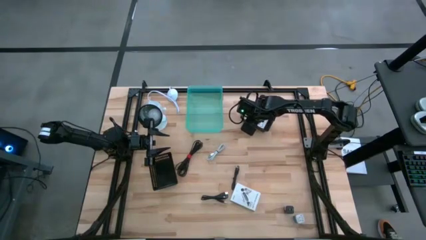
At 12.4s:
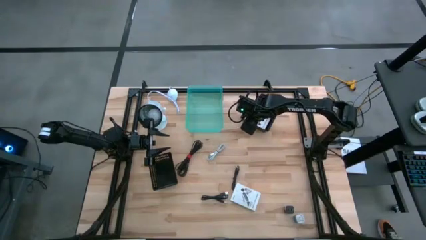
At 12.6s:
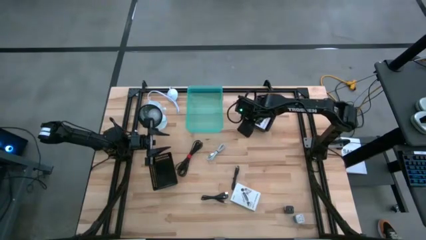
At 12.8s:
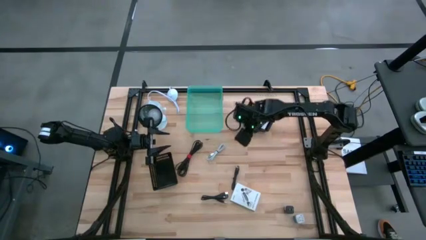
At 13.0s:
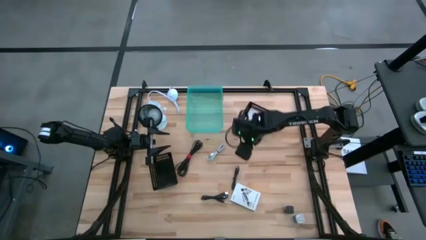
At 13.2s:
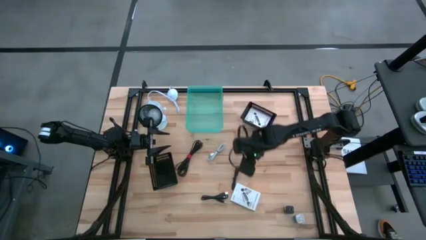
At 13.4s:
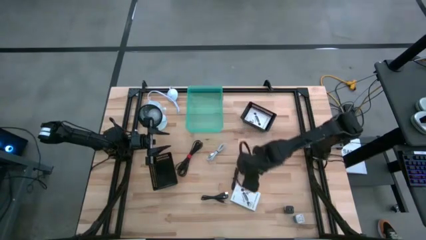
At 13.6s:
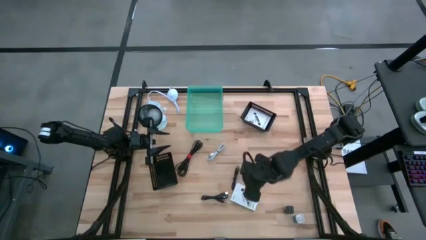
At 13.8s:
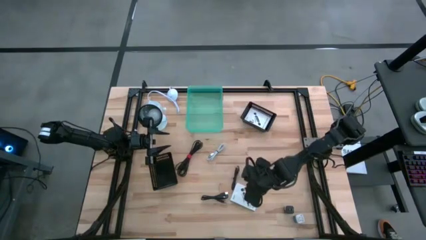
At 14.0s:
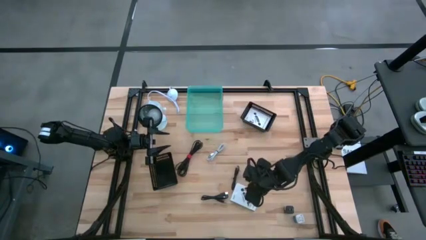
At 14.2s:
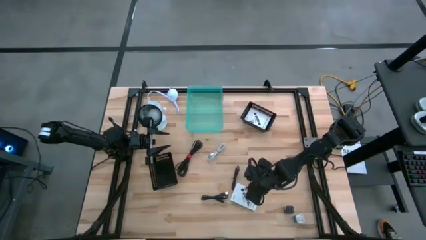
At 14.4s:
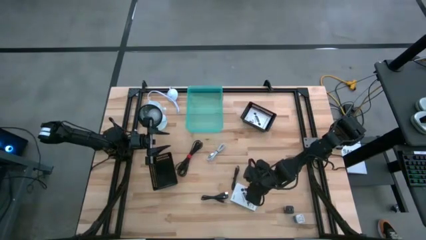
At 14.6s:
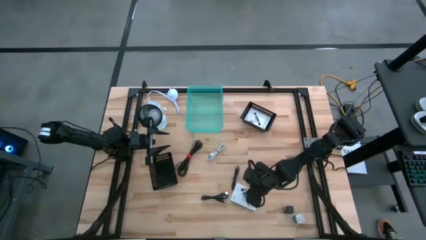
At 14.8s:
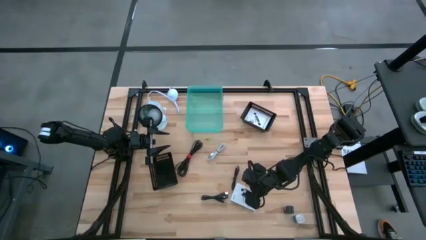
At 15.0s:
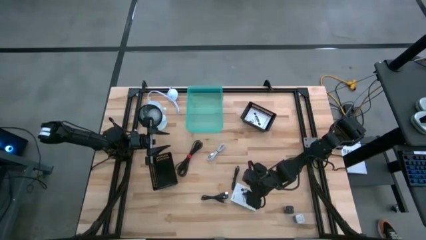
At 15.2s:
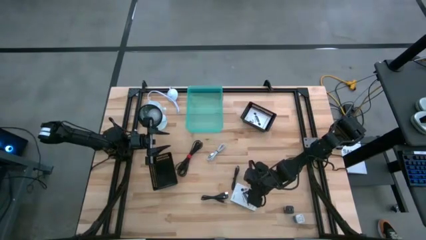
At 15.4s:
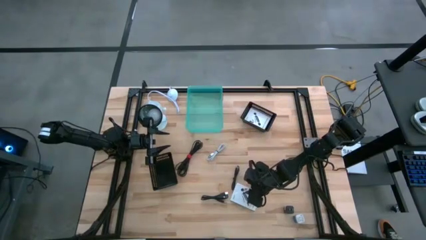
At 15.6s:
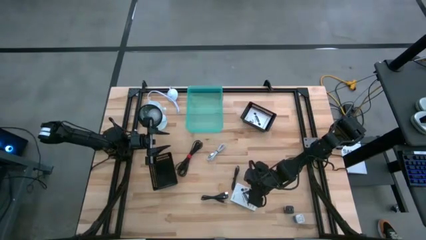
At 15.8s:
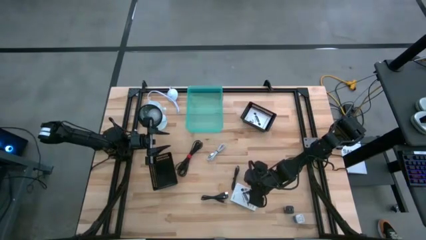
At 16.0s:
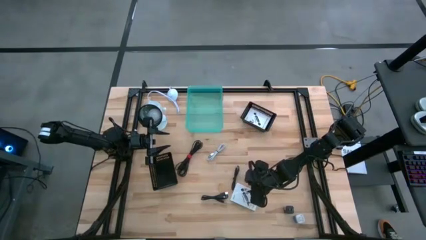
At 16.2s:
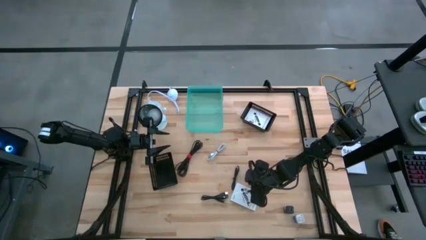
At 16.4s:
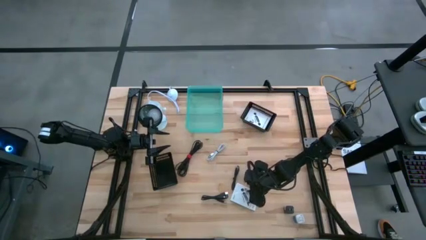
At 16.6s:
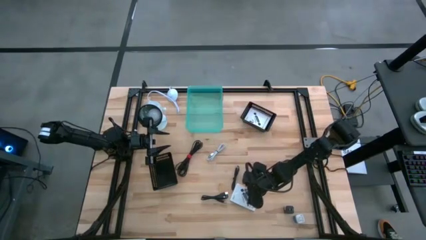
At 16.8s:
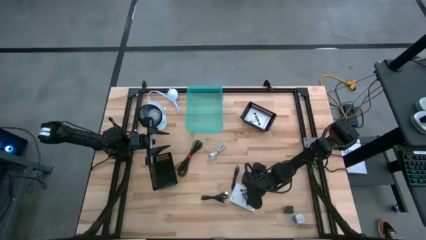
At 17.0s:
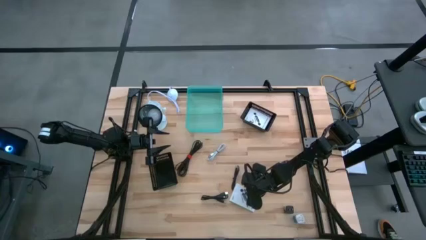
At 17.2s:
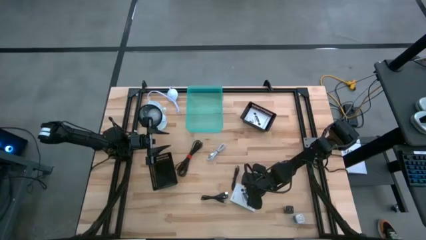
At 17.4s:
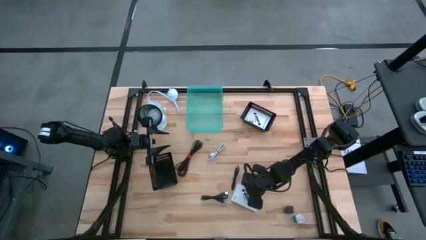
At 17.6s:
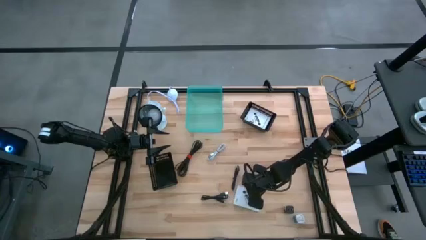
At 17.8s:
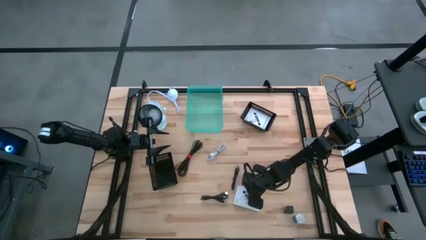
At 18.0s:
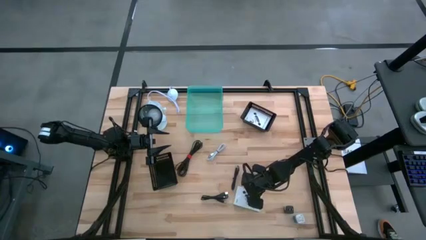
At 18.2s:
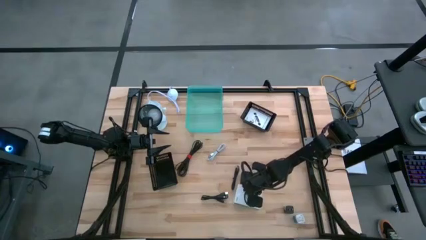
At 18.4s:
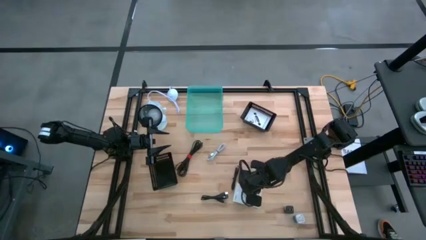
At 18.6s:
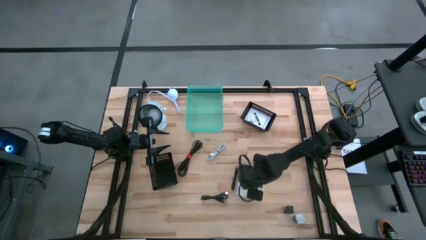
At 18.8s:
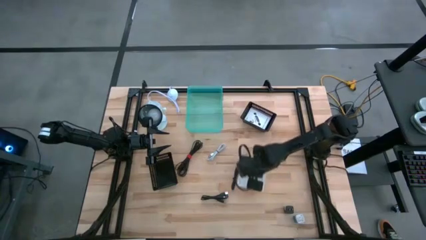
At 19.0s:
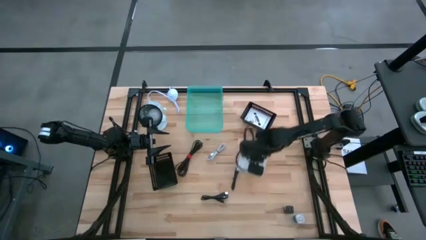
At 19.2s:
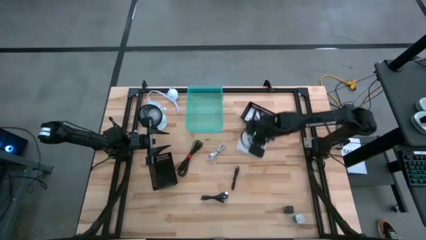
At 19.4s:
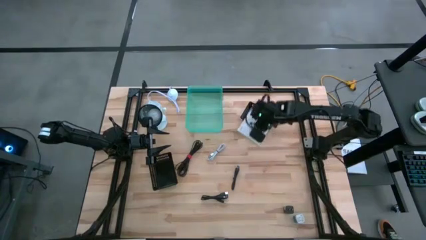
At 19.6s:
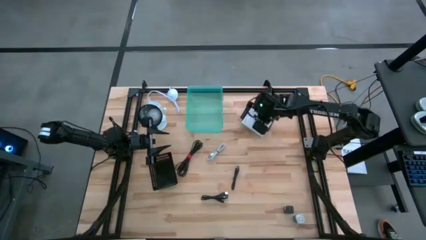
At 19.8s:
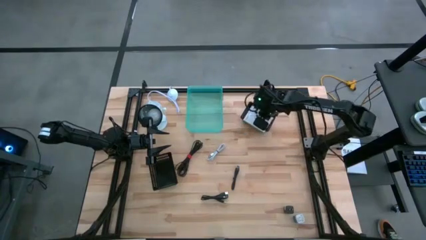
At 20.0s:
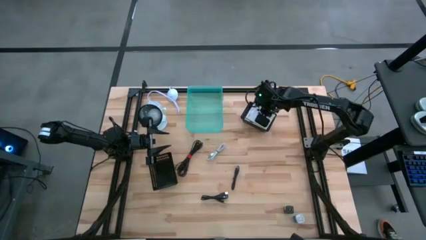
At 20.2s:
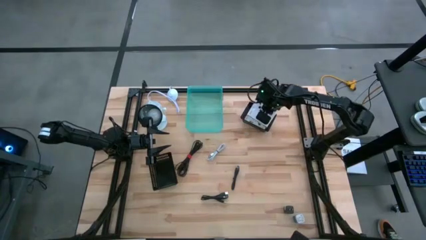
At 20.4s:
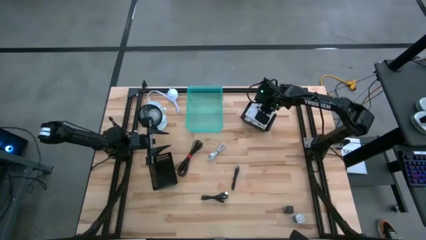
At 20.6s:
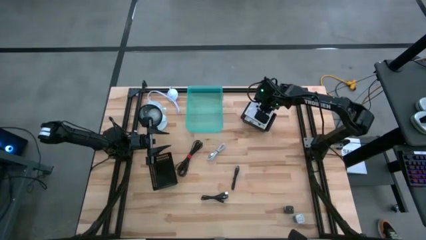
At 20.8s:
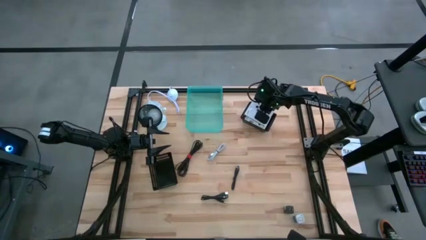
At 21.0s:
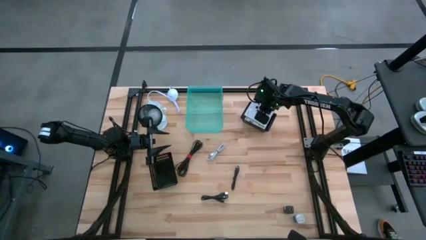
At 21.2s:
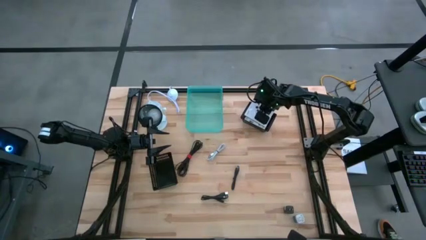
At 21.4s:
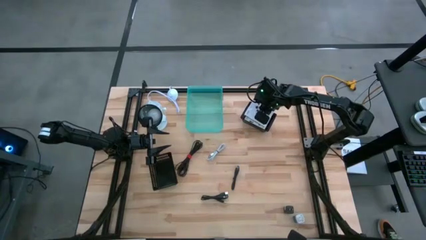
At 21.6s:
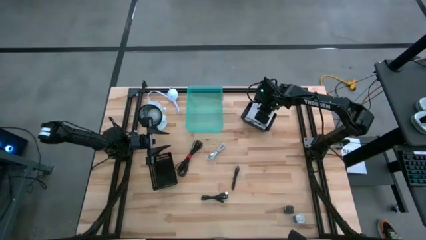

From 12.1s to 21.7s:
Task: Pick and place items into bin
Put the white card reader box into the right black bin

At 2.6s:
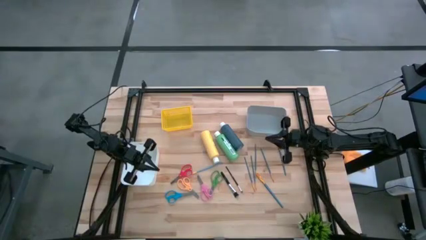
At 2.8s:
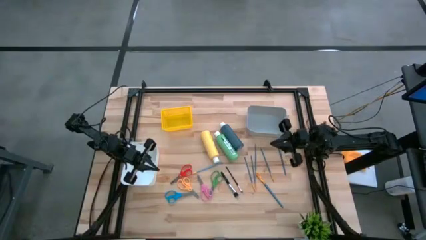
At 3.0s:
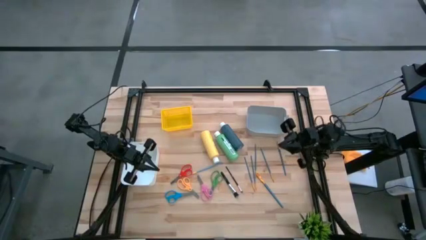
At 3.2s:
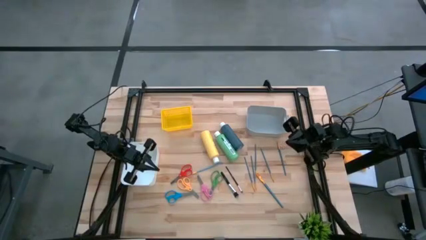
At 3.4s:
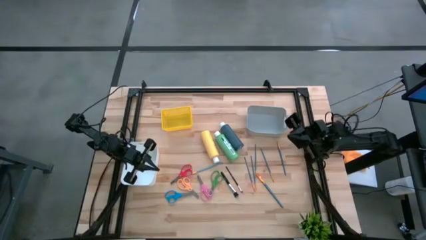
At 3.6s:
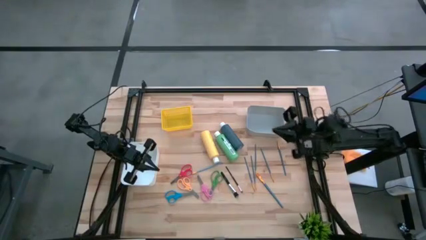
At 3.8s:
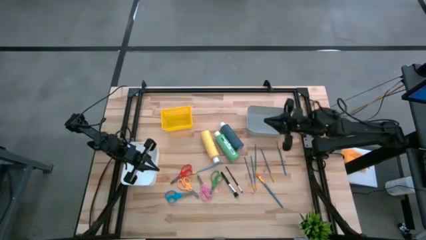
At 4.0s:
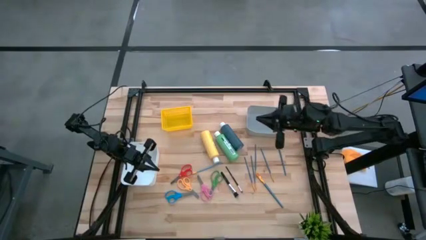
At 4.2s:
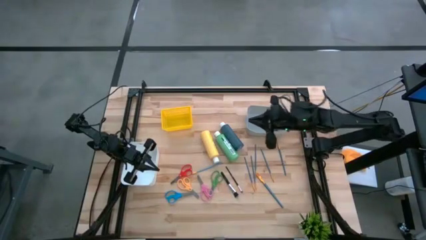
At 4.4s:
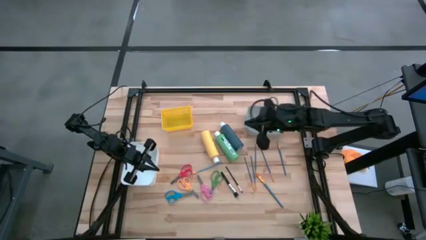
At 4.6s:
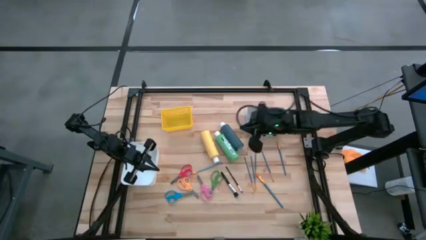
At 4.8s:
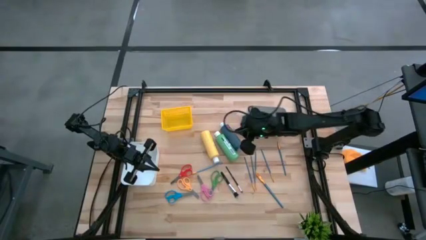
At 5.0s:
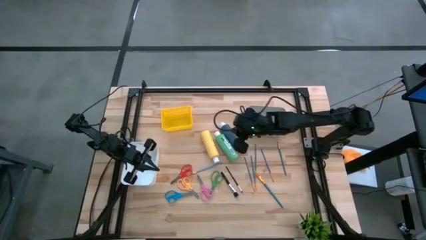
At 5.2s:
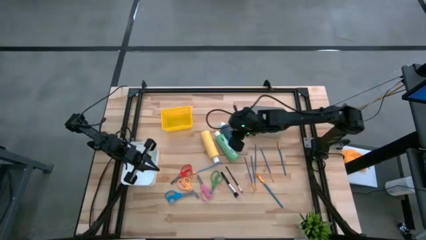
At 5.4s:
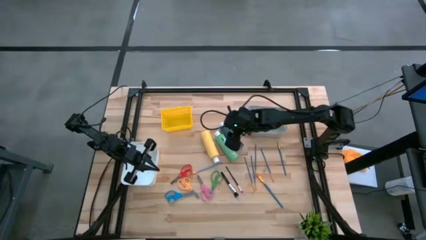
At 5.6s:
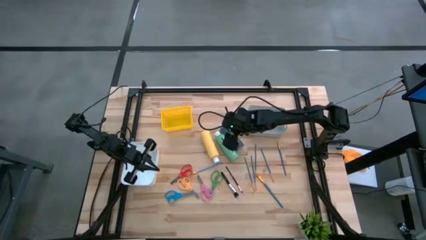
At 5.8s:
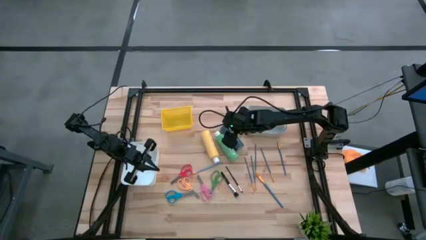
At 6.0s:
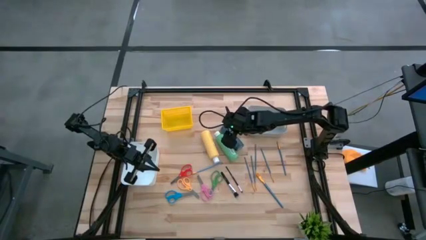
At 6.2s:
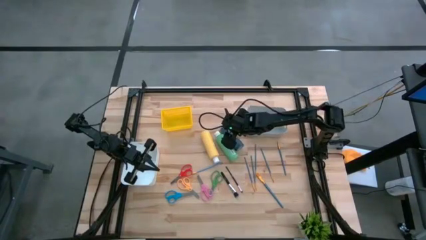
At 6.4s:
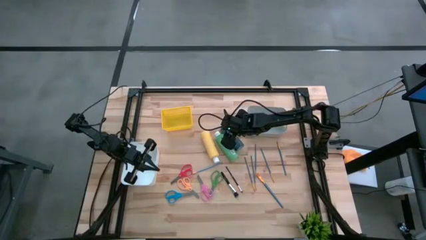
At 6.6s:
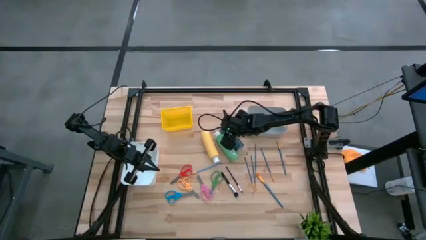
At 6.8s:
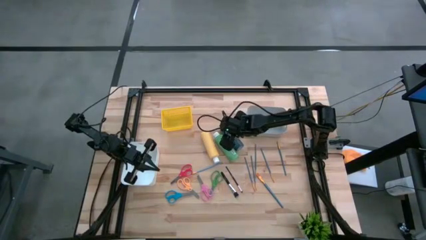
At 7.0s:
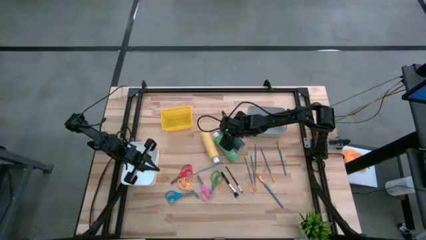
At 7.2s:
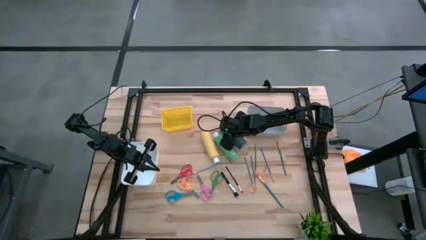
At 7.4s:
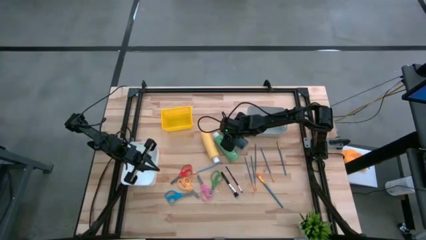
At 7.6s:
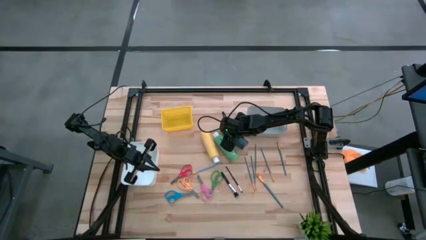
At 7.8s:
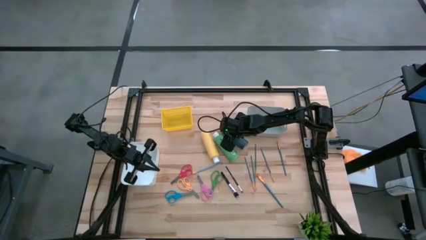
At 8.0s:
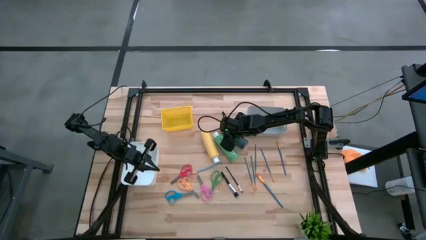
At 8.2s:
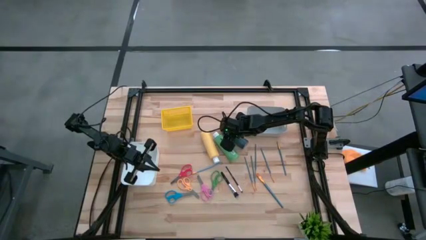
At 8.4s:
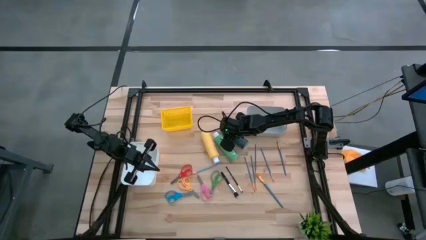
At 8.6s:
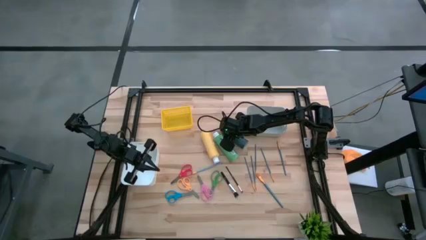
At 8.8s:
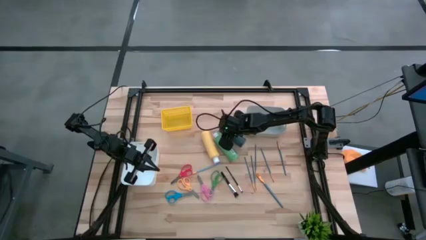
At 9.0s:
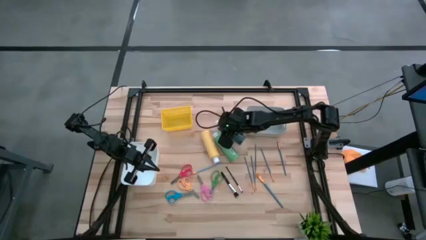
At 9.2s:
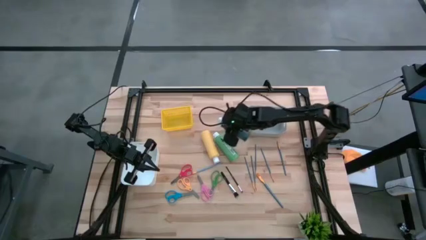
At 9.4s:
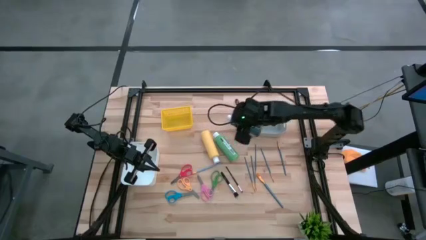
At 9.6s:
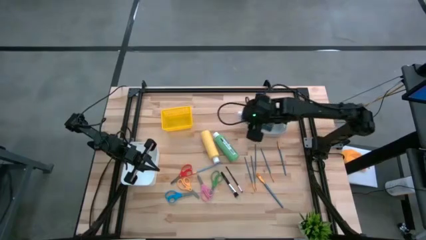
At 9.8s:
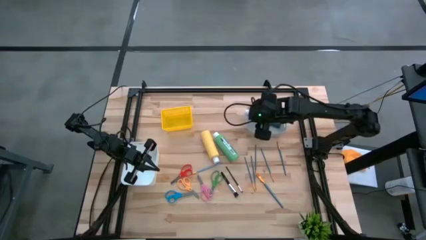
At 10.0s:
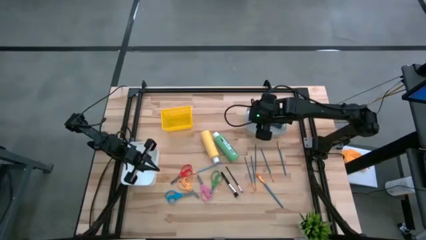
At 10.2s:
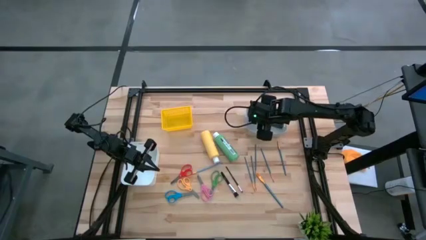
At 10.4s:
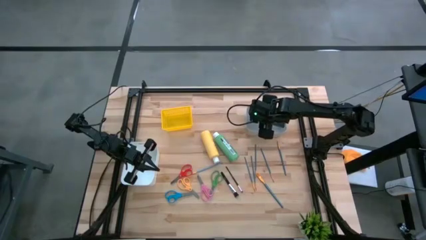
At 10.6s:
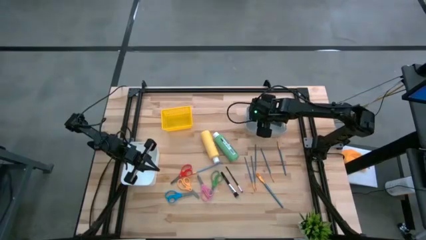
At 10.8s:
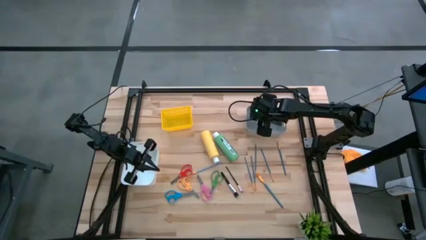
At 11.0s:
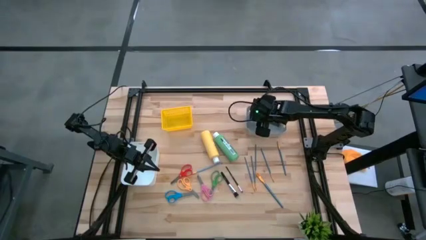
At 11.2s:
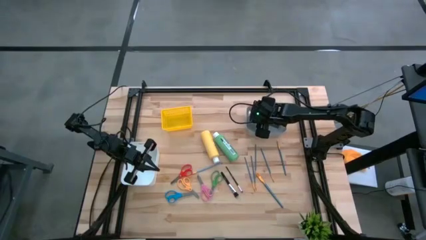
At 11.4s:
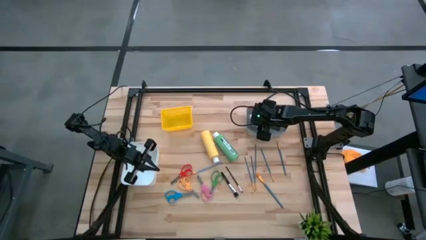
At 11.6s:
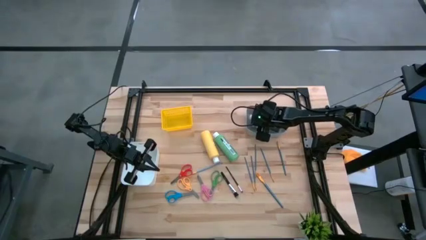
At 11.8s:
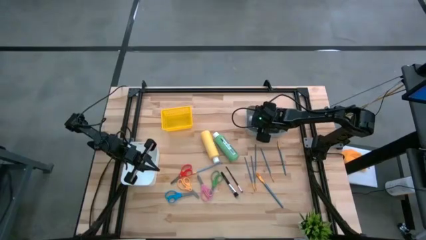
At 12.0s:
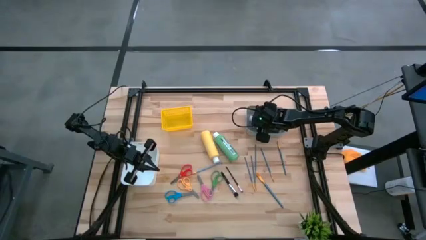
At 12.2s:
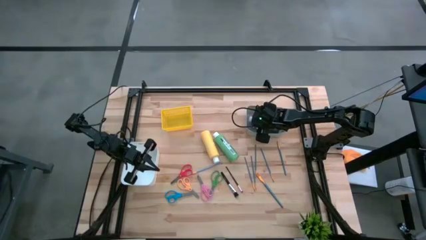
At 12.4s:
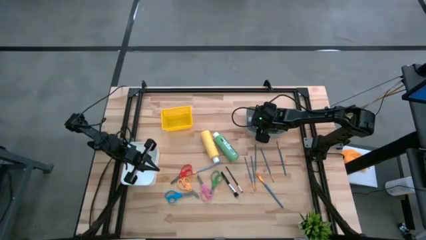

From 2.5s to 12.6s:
Task: Pick & Place Paint Supplies
Put the black acrylic paint bottle into the gray bin
